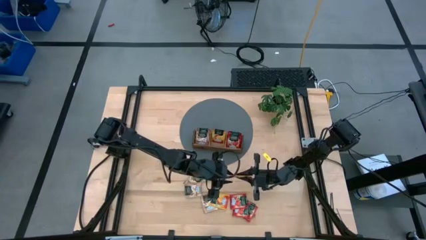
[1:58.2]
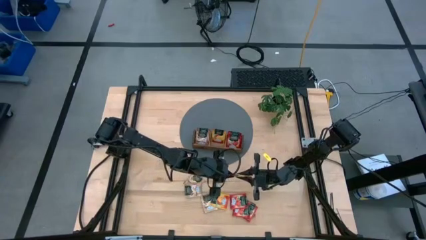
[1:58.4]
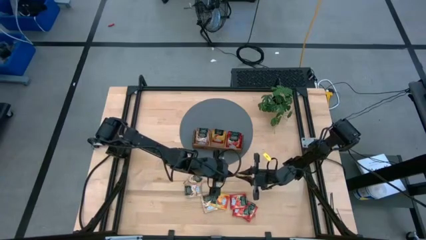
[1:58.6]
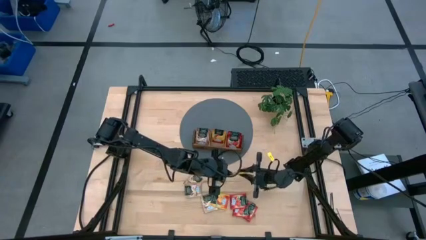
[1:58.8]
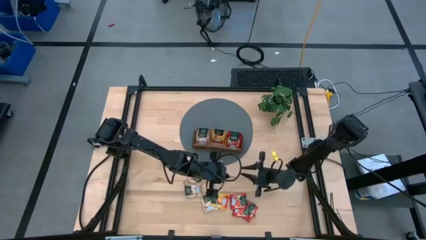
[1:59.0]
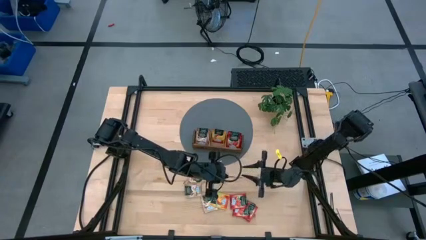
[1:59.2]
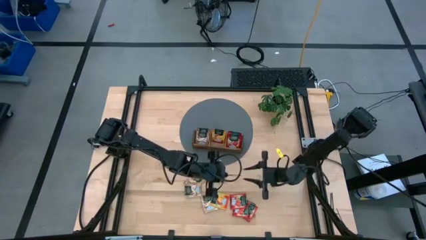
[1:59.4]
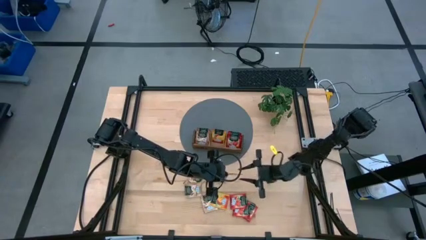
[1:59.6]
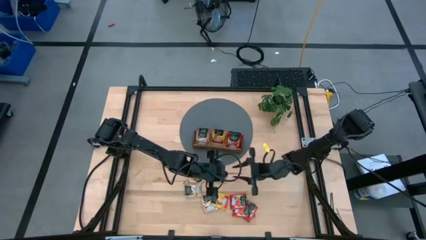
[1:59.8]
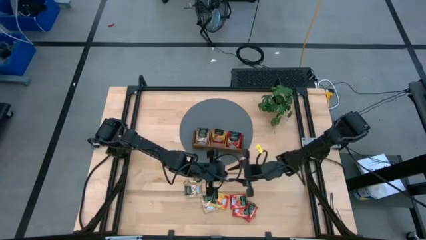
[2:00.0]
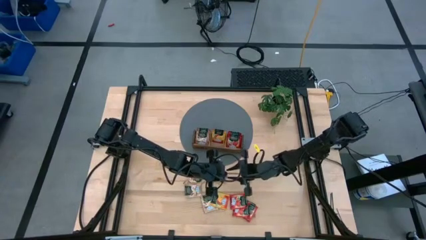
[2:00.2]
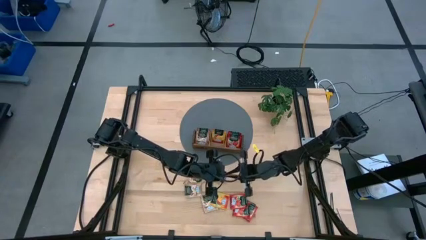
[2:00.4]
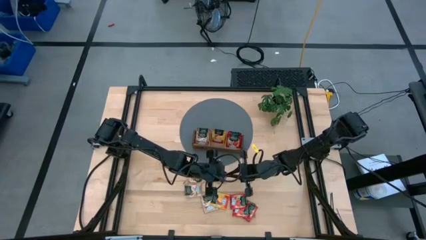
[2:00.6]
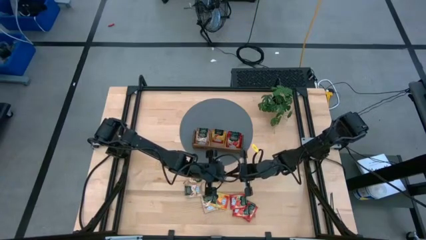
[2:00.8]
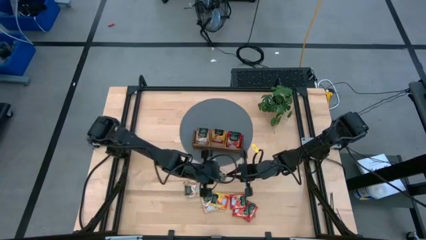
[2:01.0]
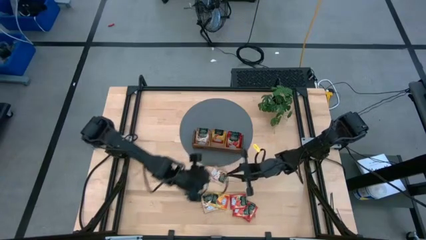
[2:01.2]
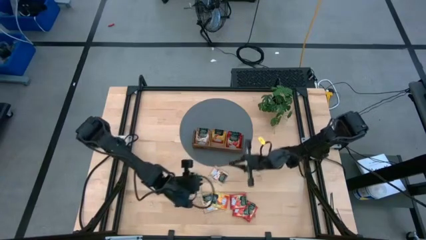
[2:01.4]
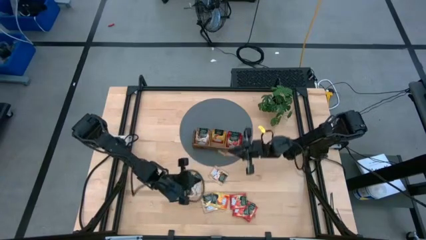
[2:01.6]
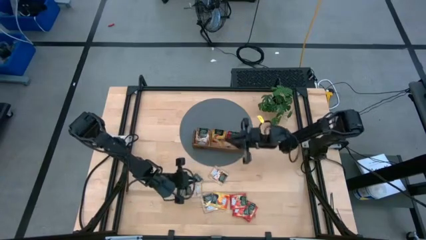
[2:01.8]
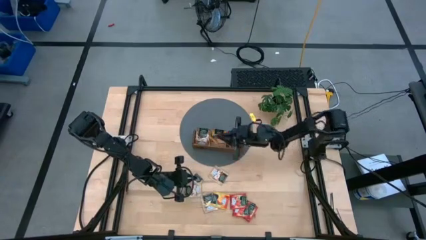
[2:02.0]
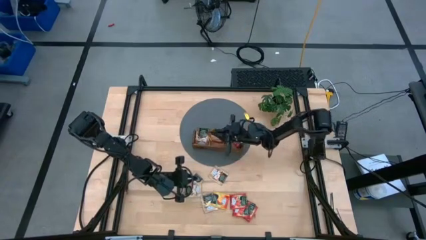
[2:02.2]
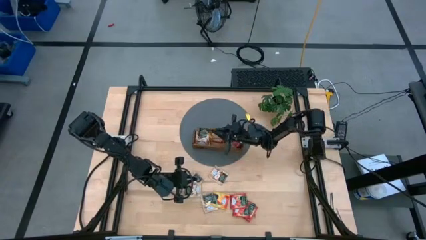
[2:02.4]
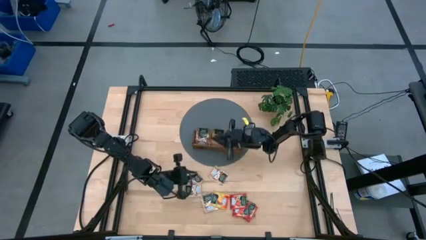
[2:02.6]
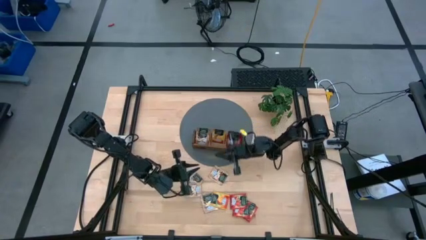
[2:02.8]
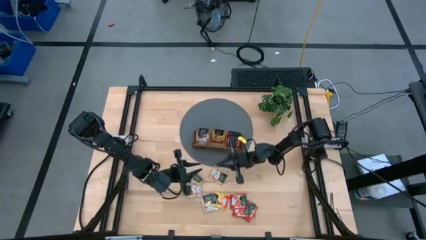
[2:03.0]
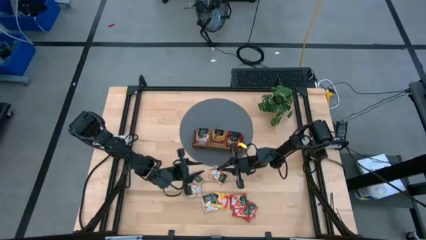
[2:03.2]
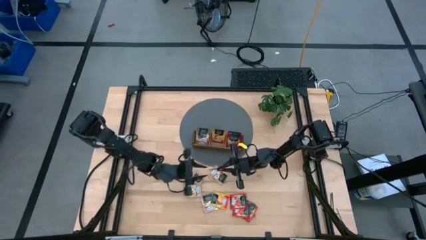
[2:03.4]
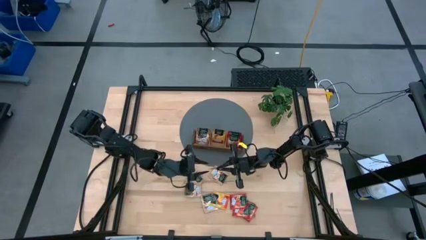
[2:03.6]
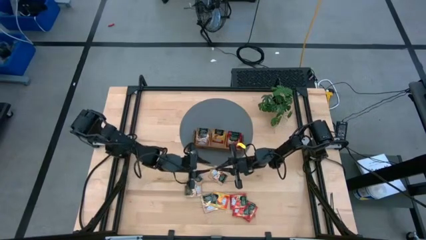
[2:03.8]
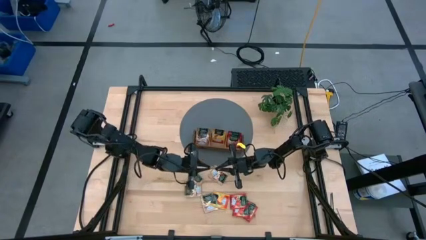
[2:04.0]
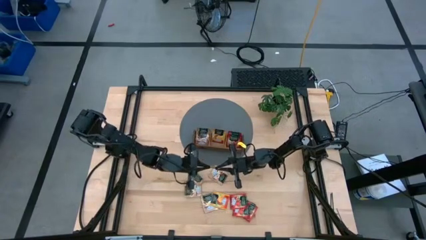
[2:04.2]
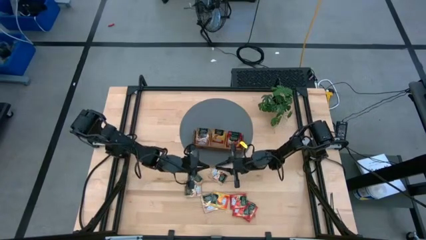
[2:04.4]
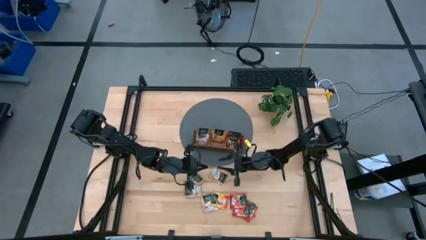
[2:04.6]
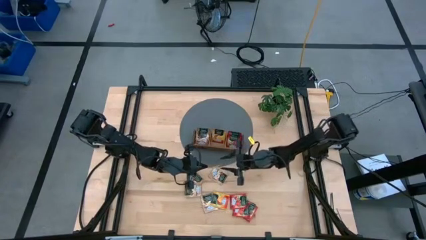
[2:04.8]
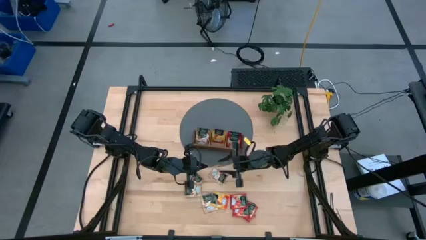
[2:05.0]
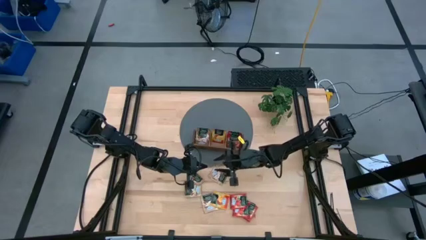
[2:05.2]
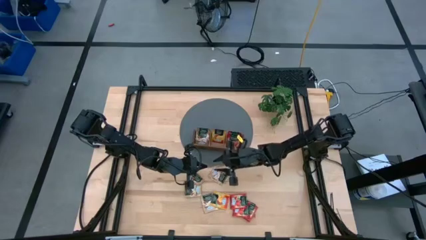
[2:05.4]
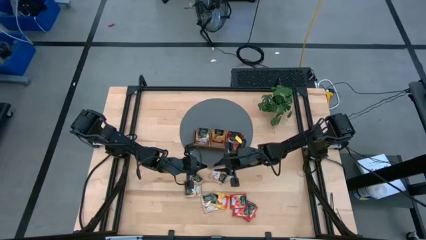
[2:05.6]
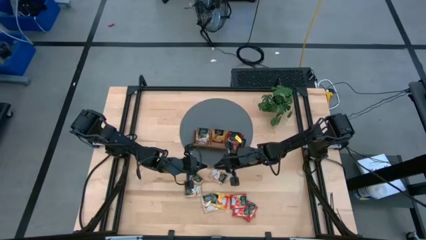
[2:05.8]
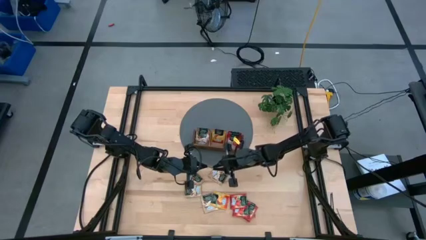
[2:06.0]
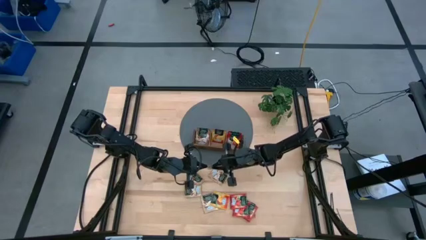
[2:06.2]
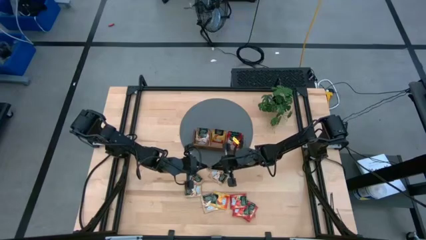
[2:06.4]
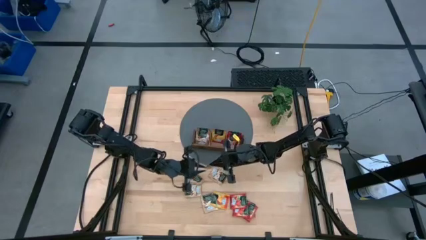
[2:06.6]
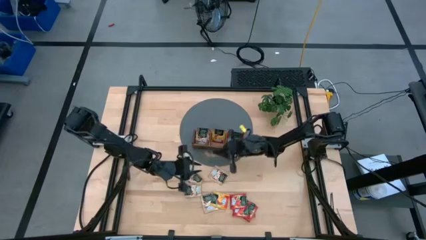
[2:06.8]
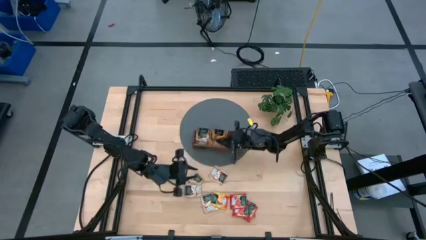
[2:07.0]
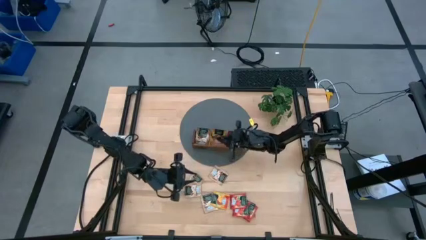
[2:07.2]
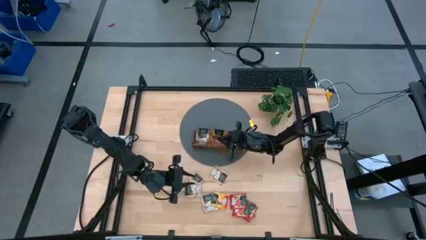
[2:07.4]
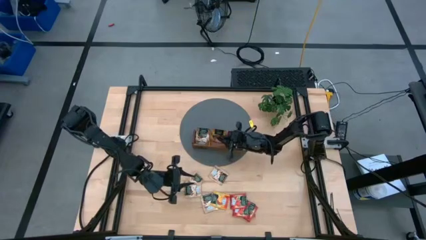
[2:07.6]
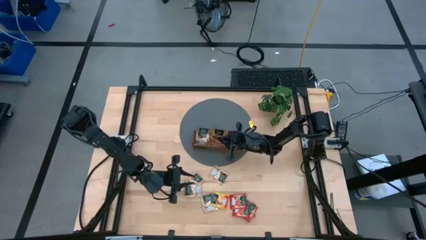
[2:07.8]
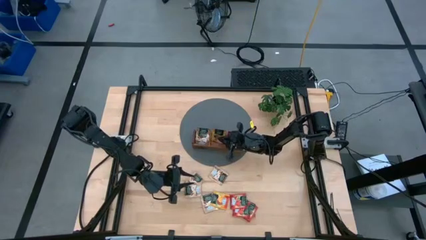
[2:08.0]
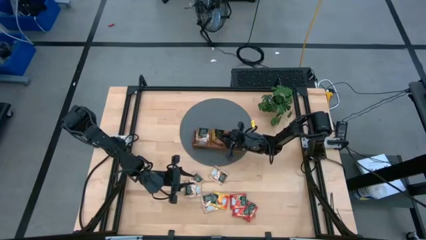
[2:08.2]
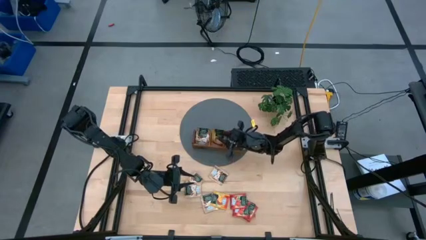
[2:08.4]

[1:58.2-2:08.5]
Task: Pick & Place Tea
Put the yellow tea bag into the middle section of the wooden organizer

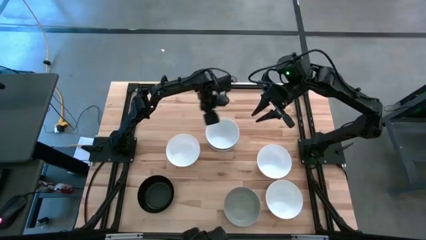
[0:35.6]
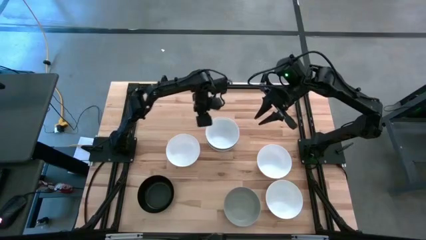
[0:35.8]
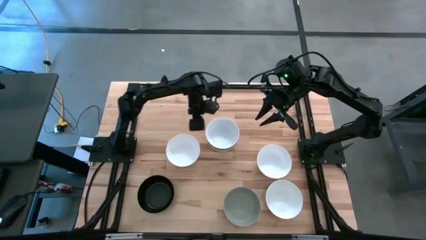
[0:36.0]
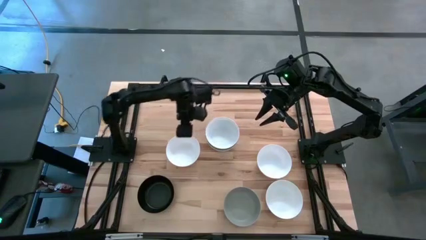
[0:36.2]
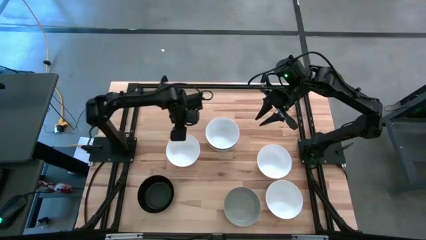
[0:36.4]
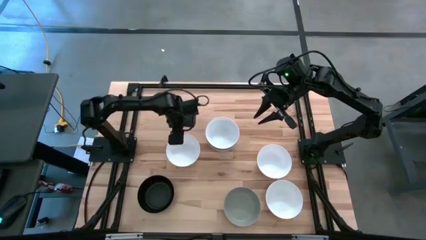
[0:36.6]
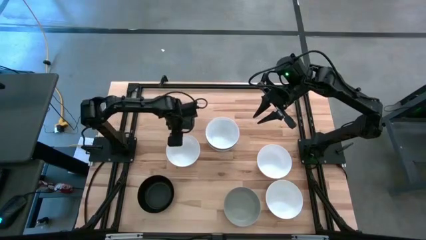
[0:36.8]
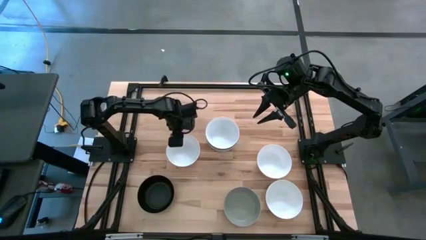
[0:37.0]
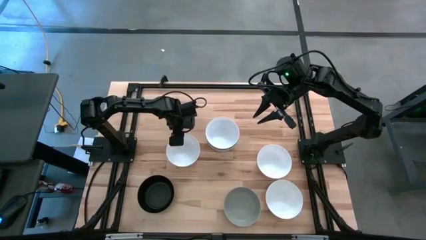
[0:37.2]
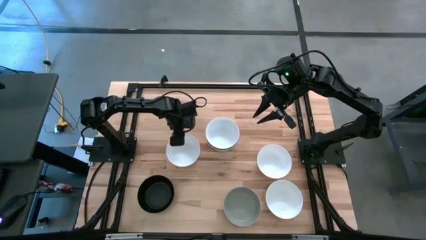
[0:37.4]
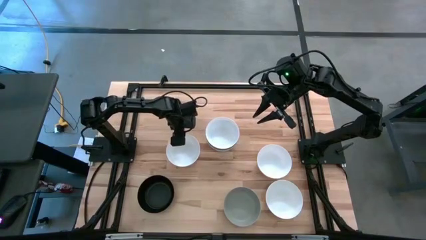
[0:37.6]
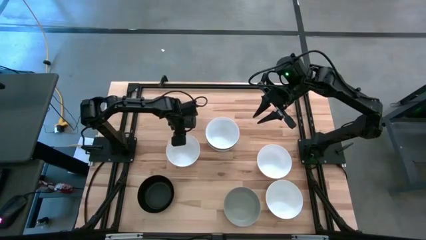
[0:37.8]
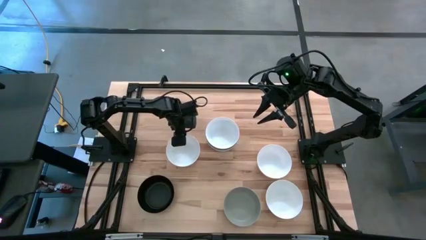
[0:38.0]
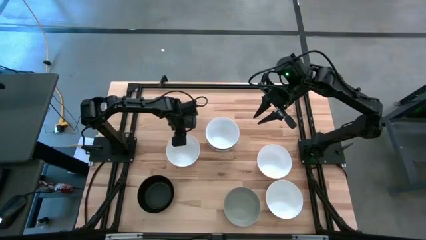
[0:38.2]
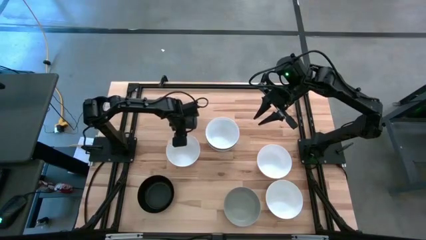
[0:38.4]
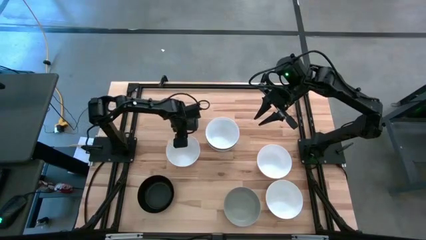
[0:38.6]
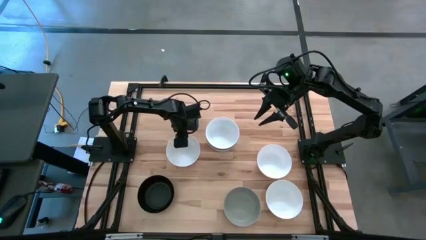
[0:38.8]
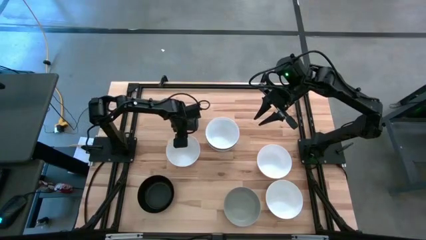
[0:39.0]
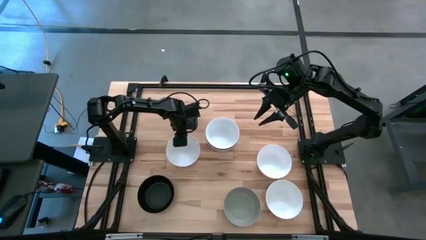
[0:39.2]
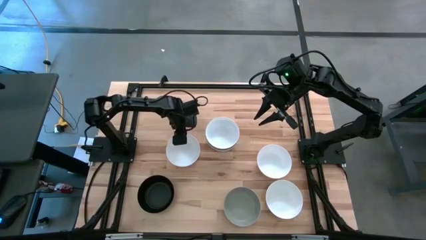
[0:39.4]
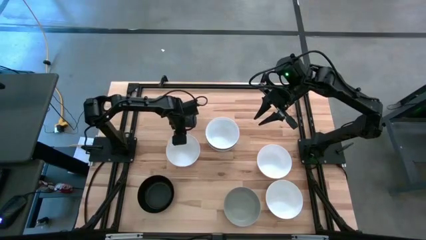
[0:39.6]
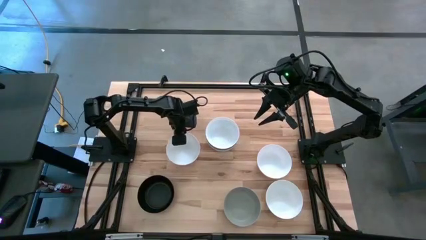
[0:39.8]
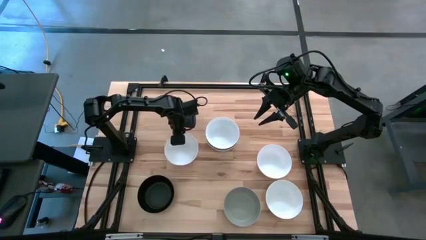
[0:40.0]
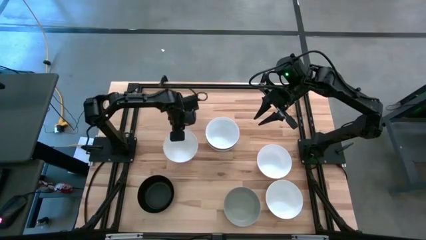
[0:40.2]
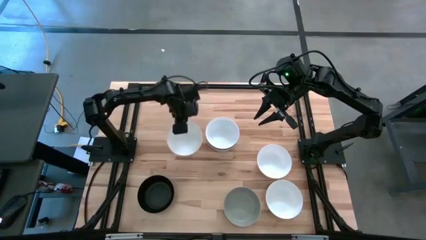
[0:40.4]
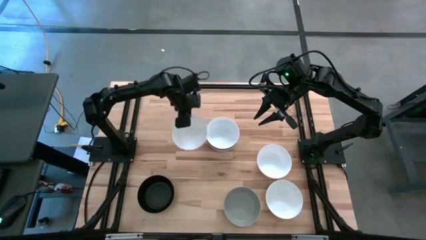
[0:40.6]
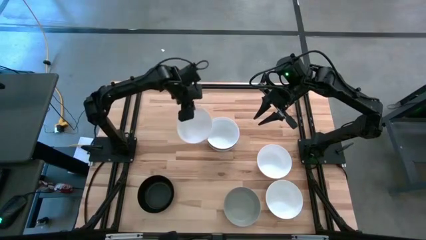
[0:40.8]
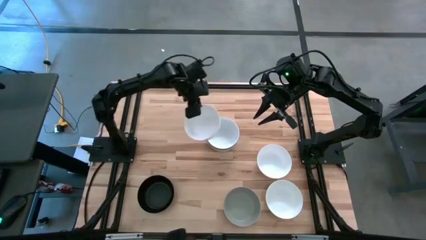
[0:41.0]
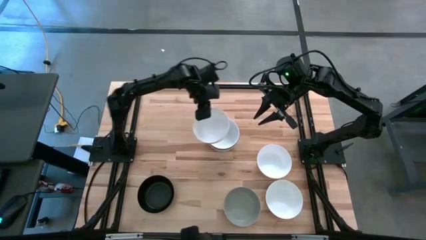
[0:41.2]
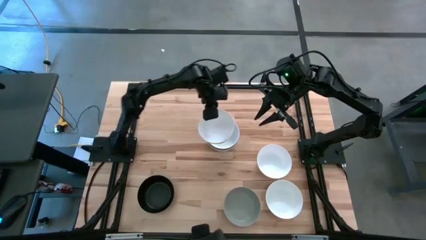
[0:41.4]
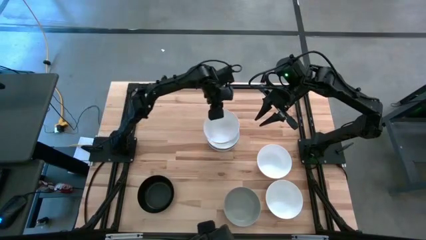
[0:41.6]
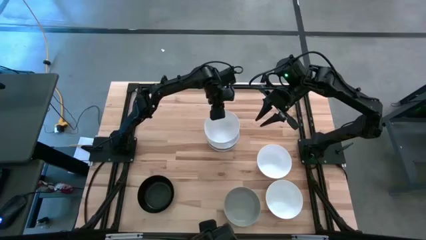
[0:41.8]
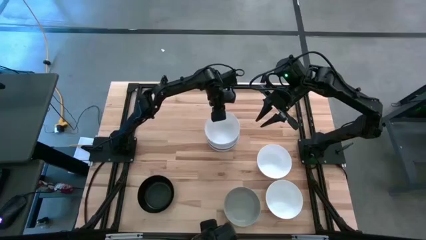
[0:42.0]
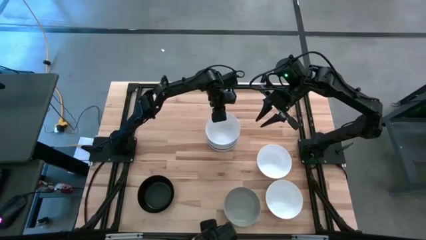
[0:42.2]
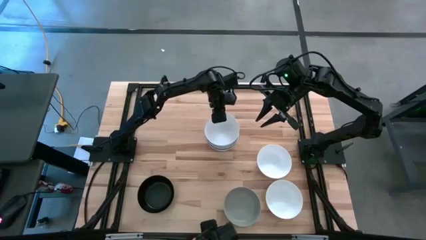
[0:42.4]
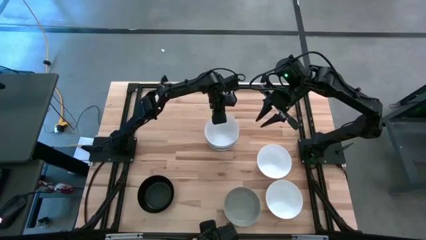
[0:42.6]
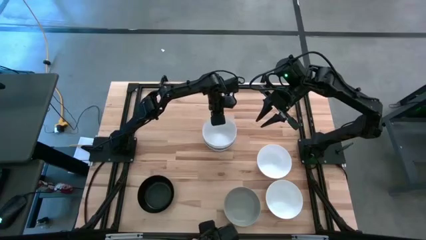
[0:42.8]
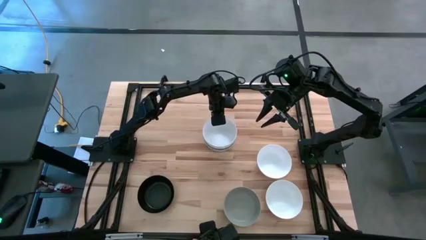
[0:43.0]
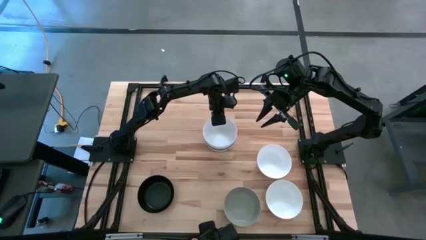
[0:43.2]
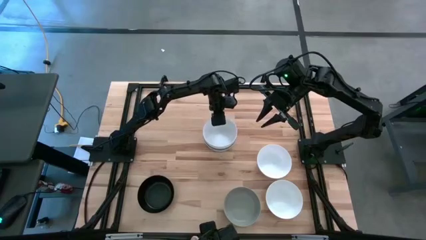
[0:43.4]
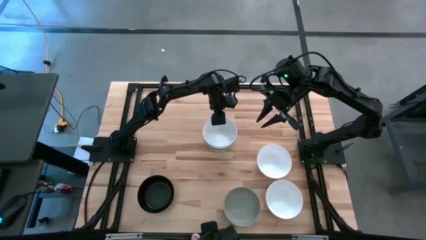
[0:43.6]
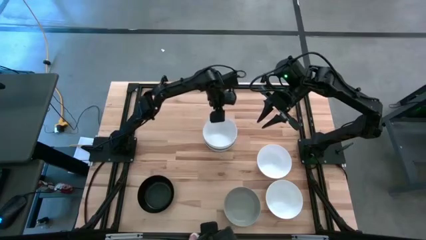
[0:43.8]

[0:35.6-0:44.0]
Task: Nest bowls inside each other
Stack the white bowl on top of the white bowl
